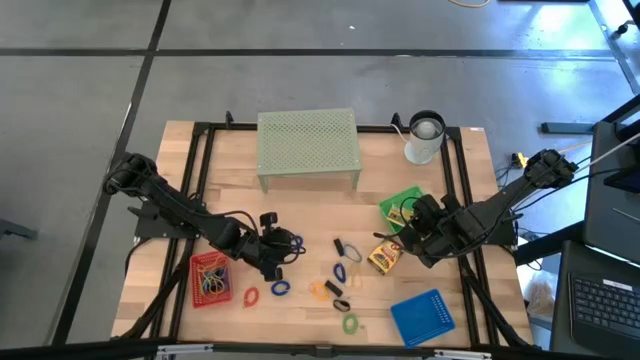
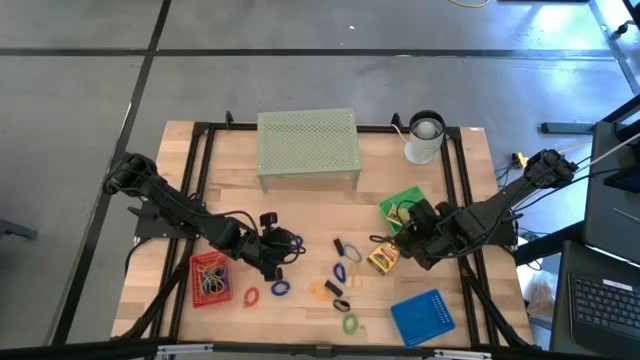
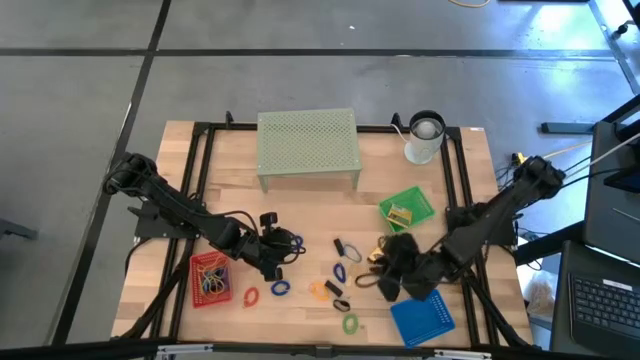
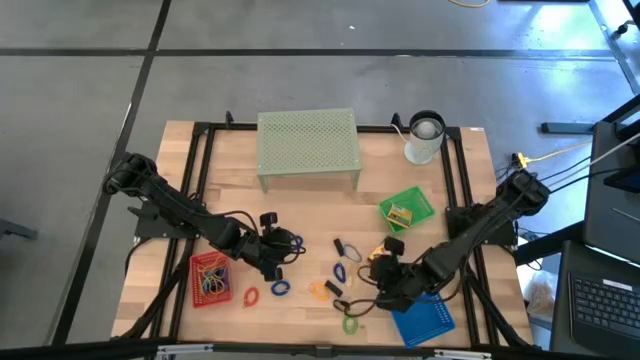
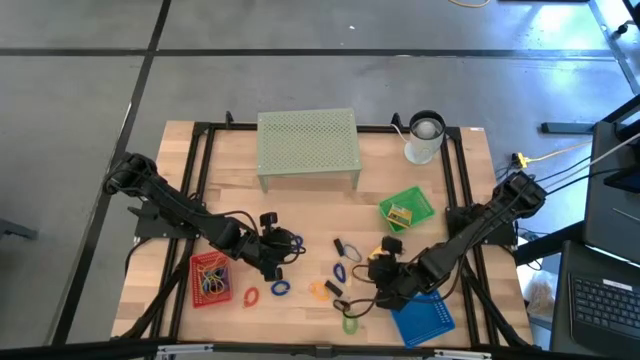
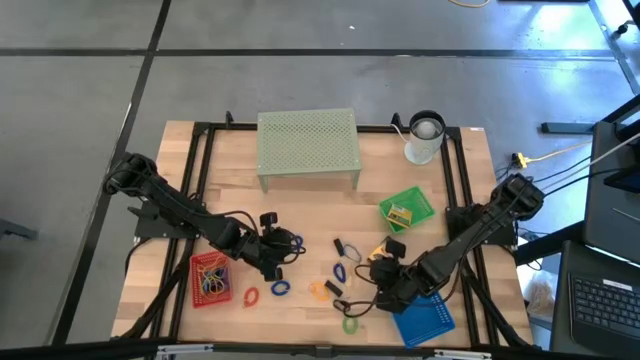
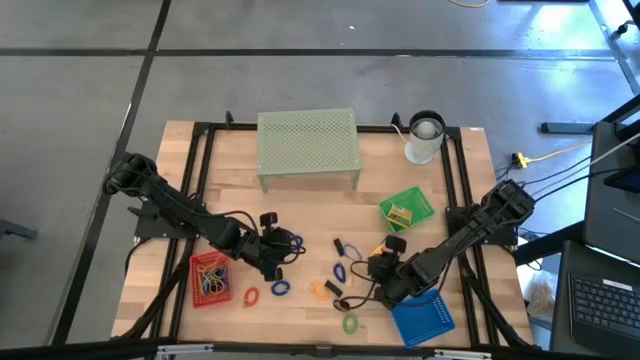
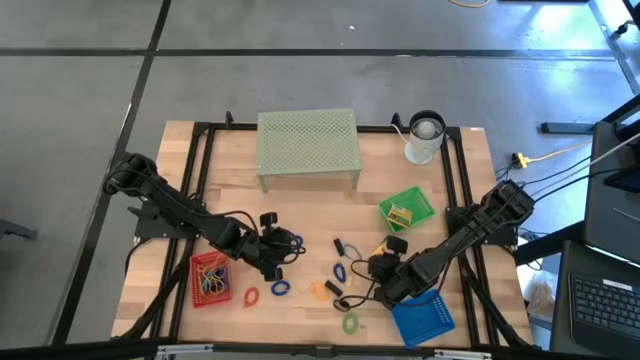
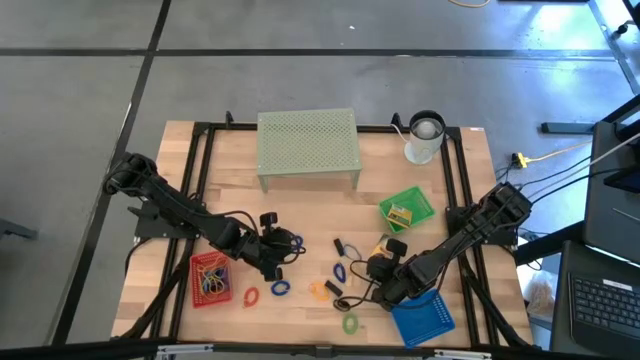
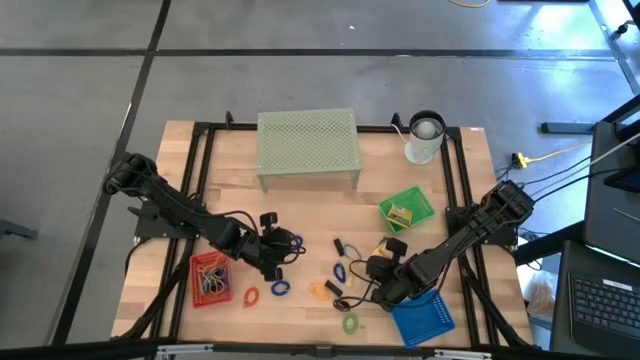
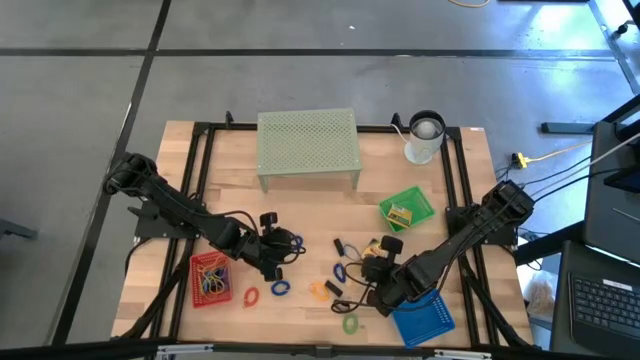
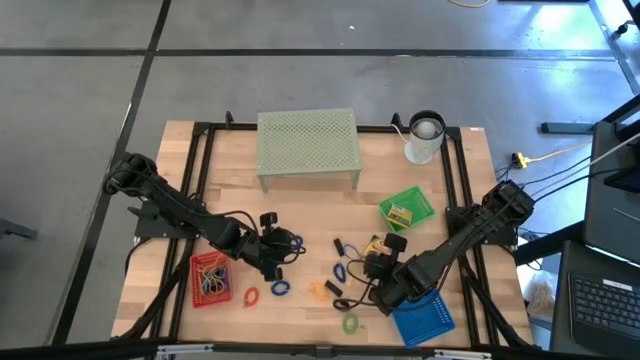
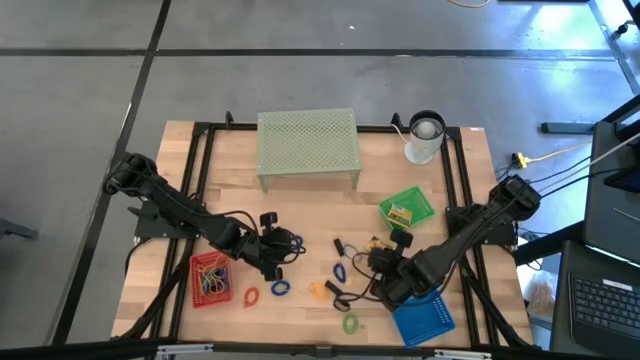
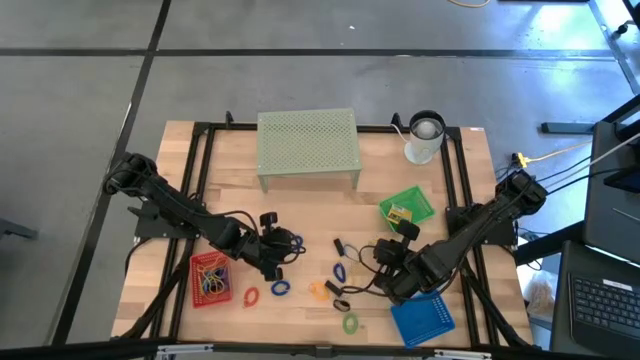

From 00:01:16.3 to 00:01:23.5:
Task: Pick & Place Office Desk Supplies
Put the crayon box into the green bin

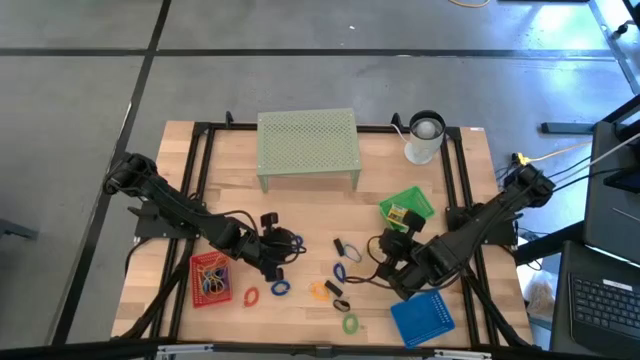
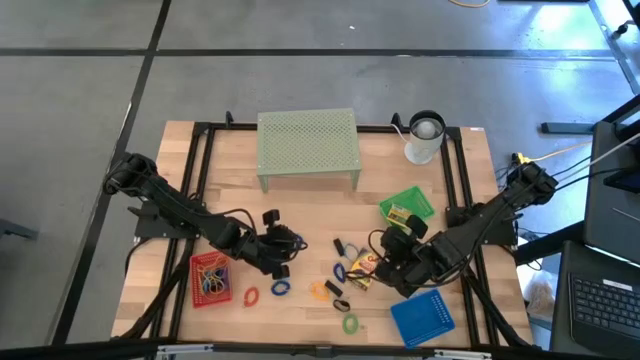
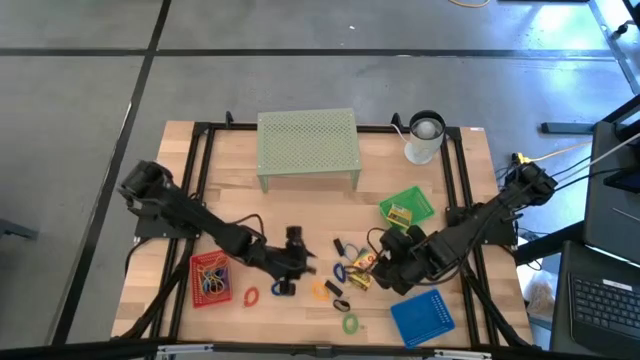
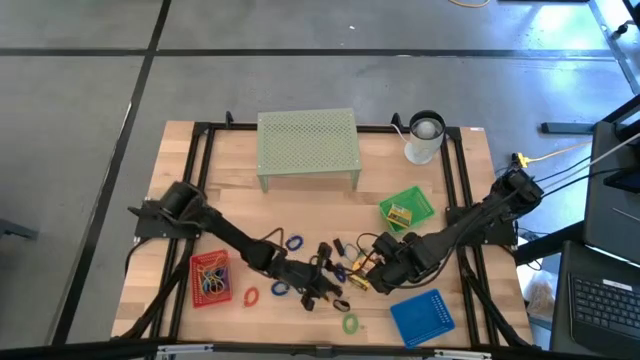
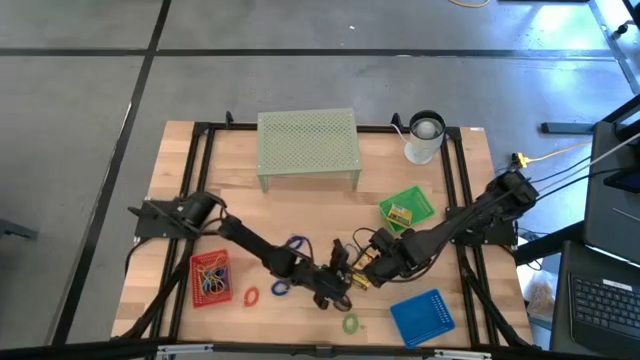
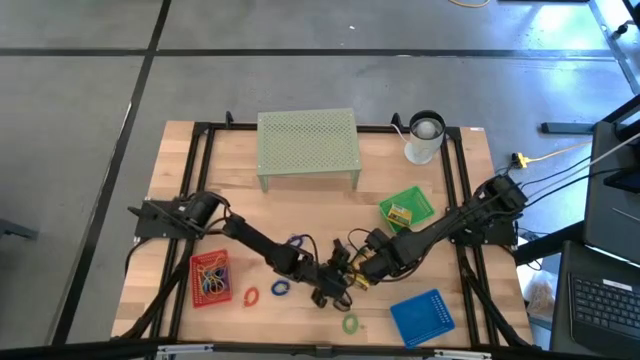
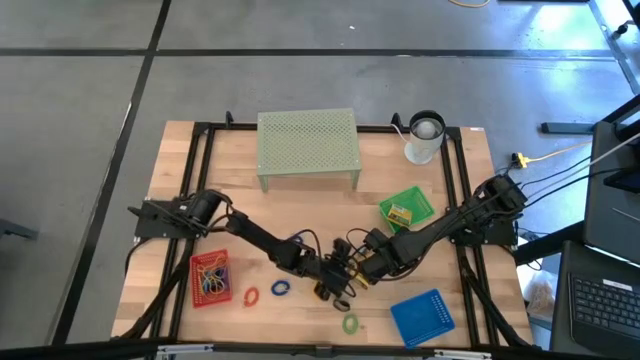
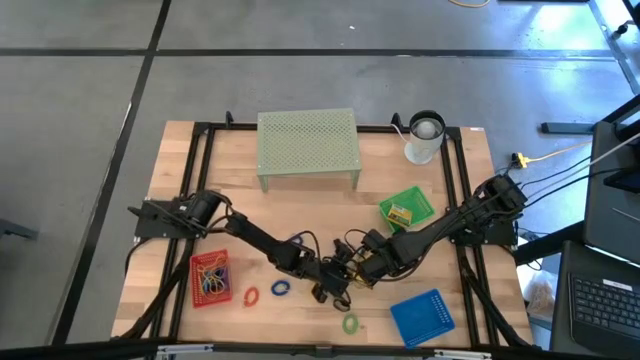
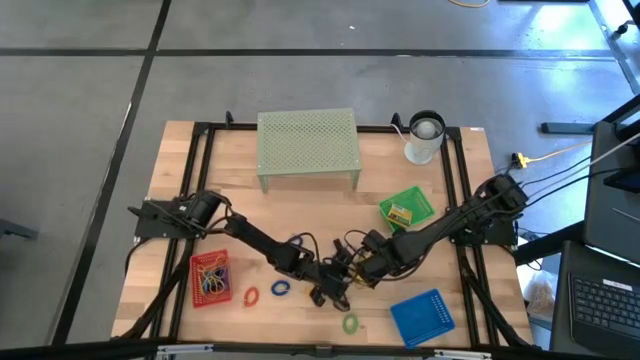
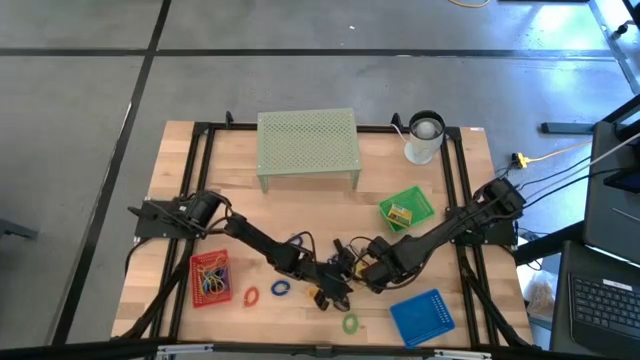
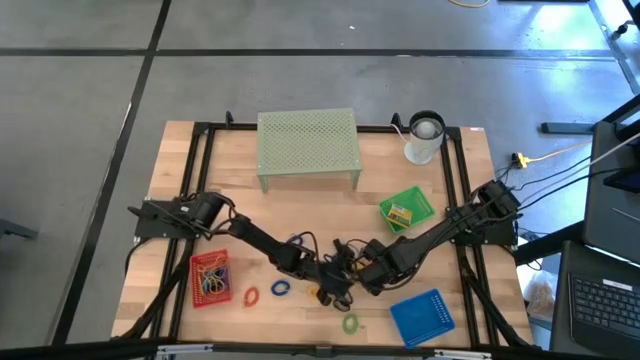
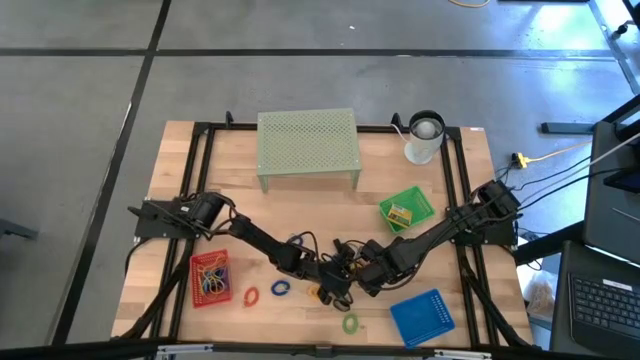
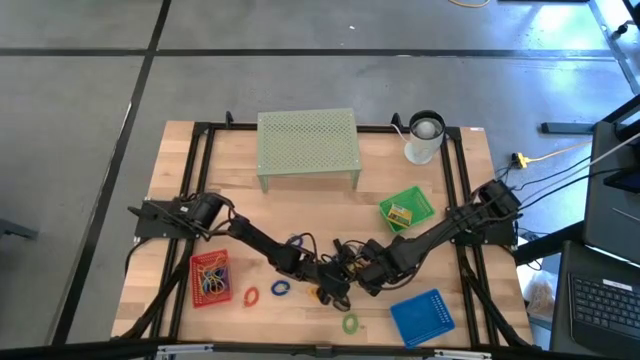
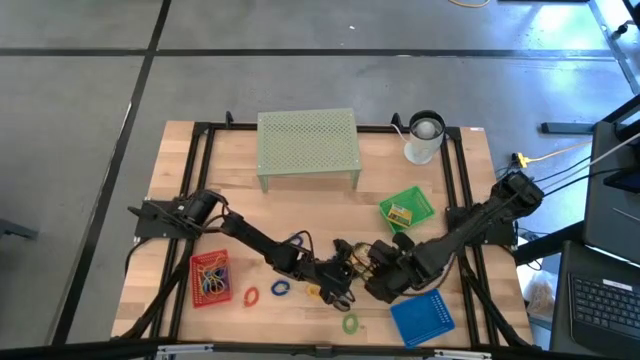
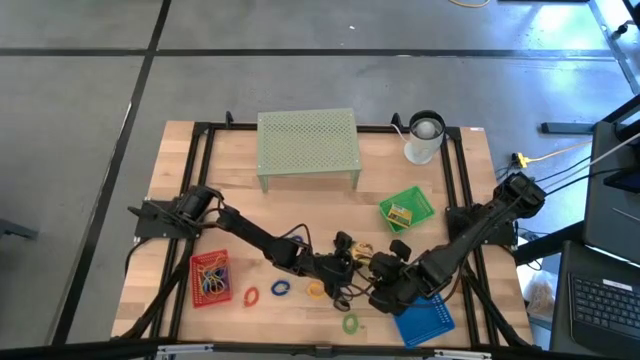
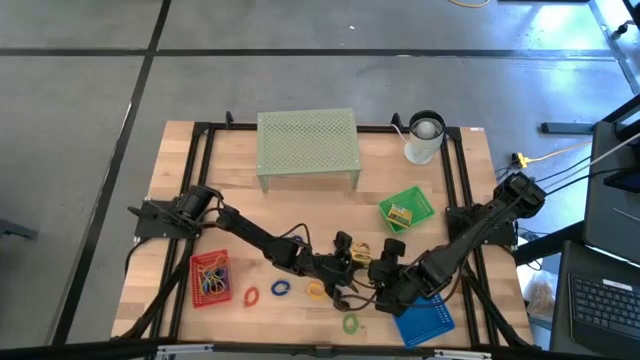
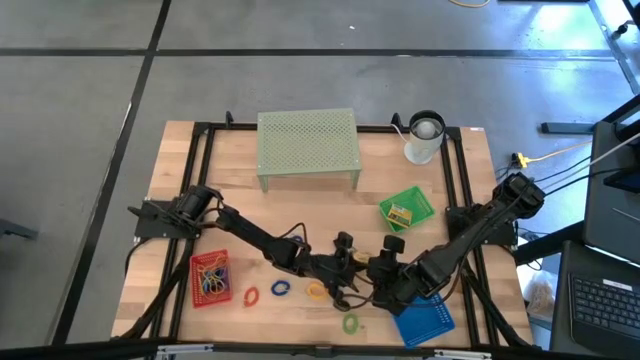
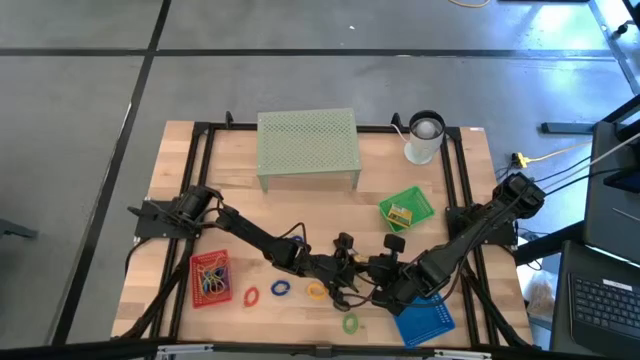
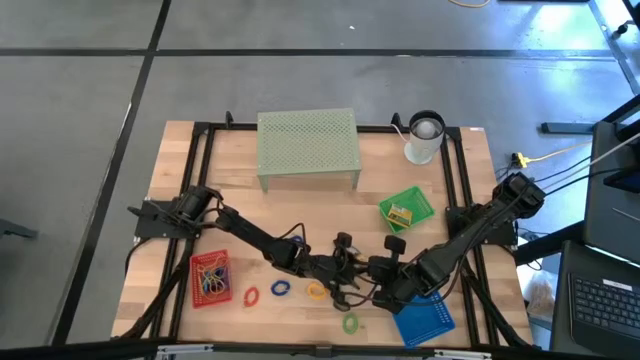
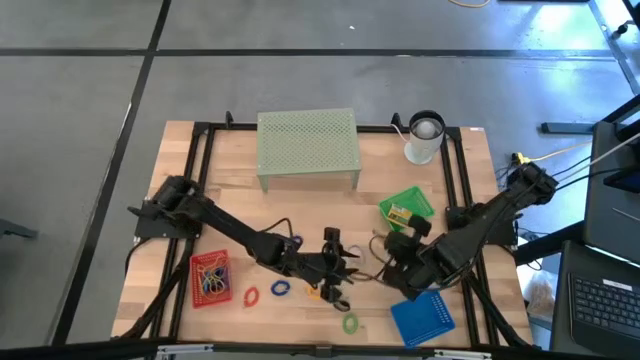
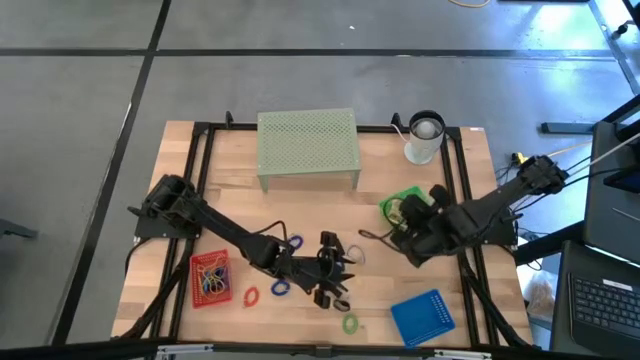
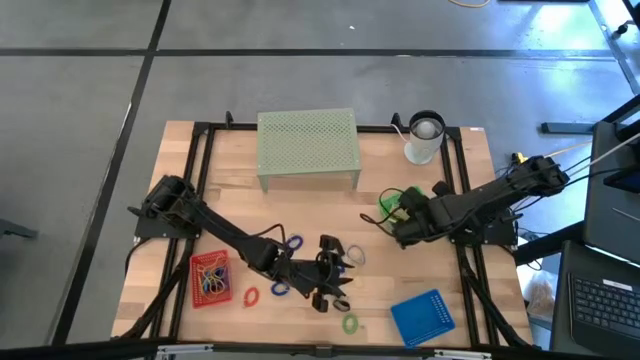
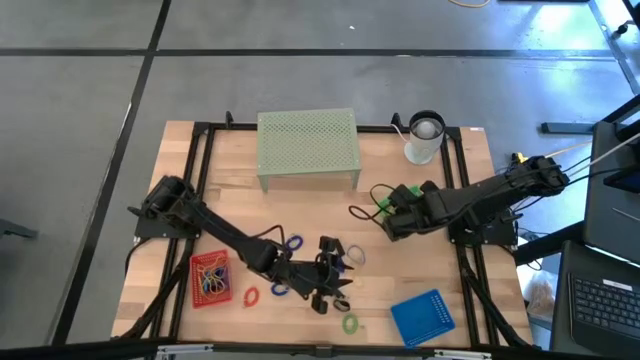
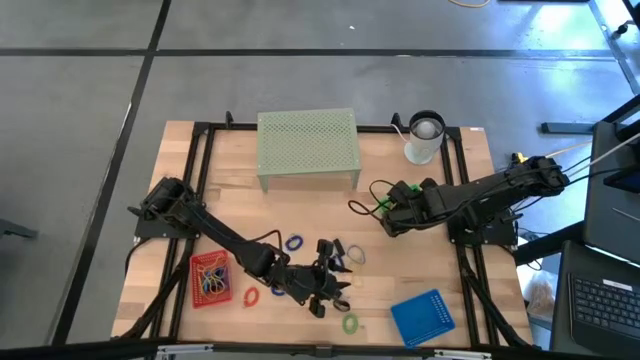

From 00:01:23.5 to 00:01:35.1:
Put the crayon box into the green bin
